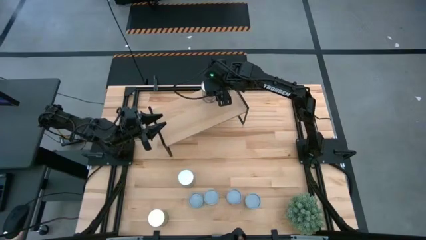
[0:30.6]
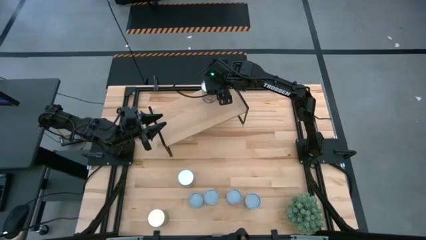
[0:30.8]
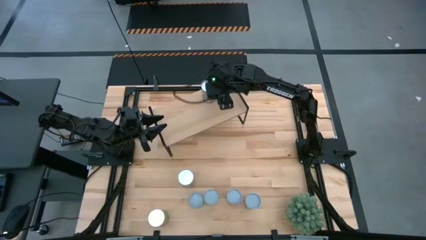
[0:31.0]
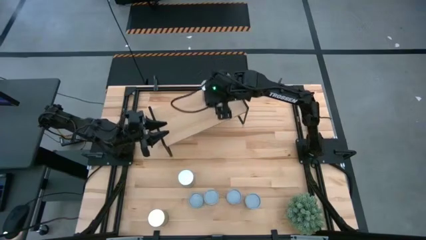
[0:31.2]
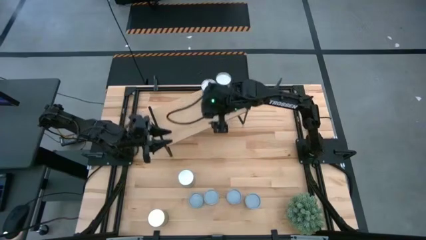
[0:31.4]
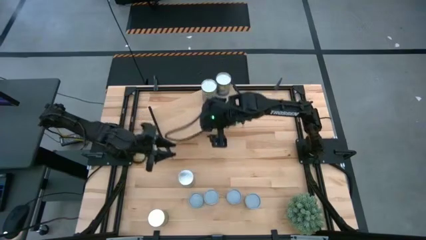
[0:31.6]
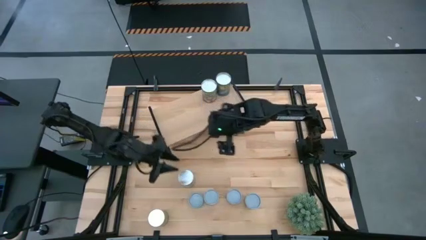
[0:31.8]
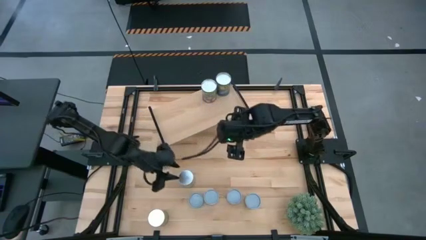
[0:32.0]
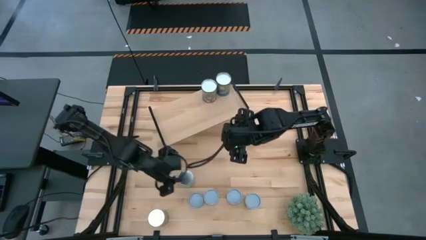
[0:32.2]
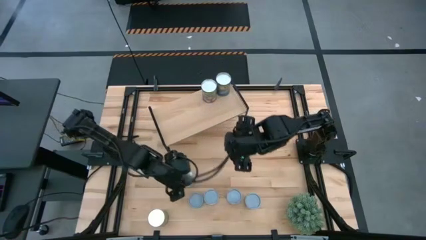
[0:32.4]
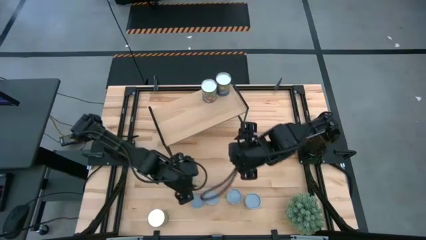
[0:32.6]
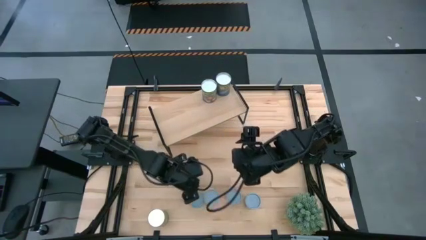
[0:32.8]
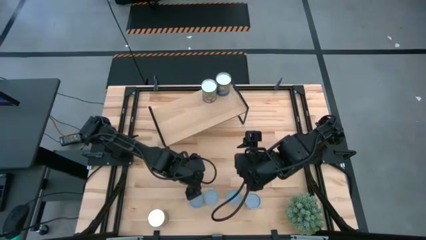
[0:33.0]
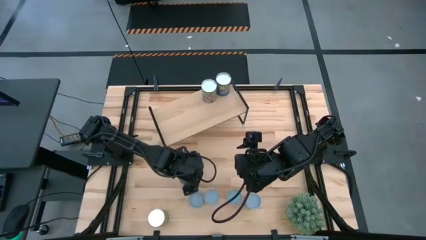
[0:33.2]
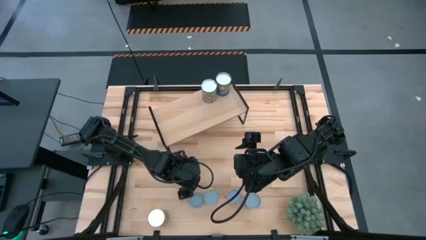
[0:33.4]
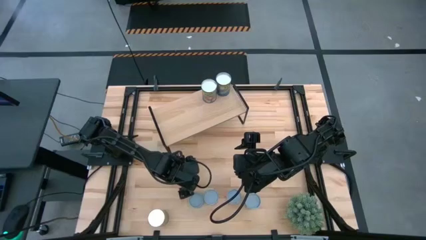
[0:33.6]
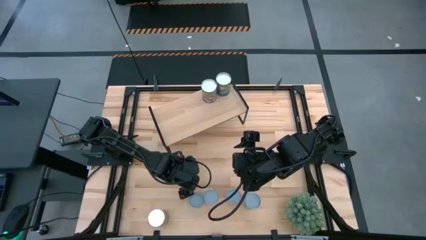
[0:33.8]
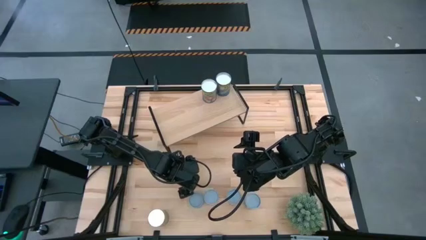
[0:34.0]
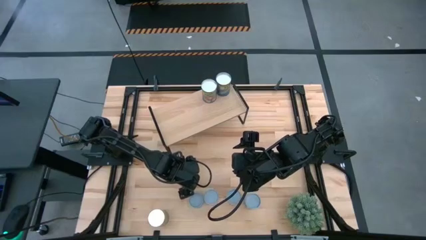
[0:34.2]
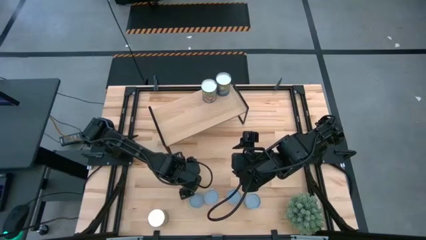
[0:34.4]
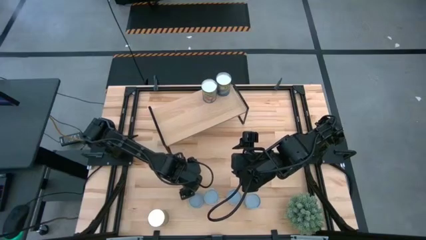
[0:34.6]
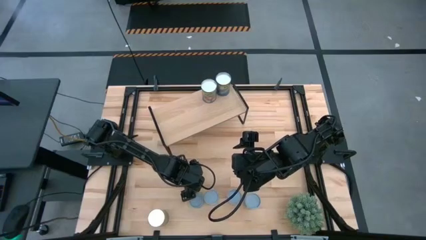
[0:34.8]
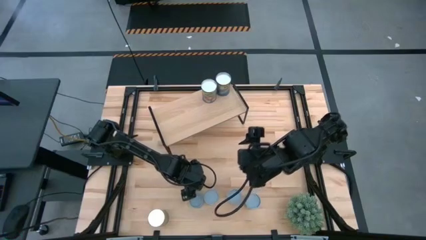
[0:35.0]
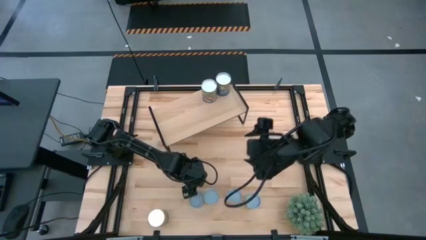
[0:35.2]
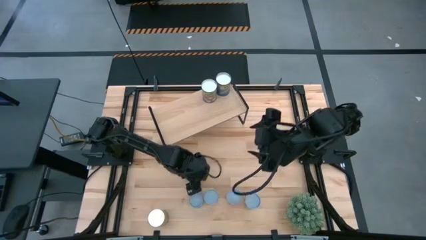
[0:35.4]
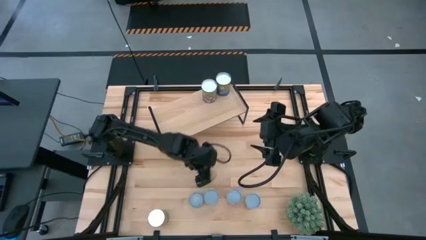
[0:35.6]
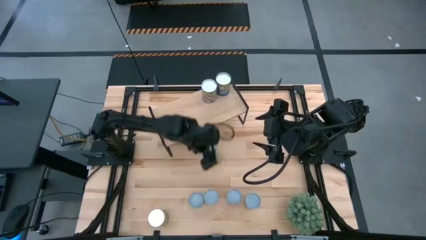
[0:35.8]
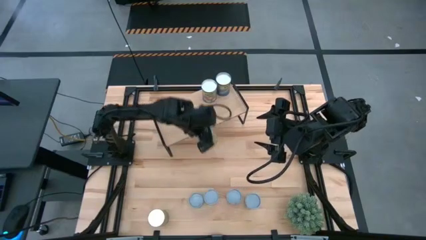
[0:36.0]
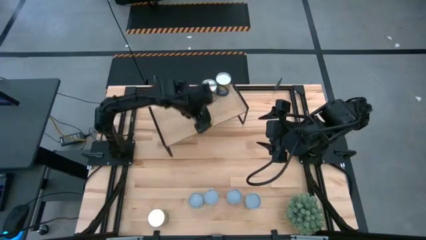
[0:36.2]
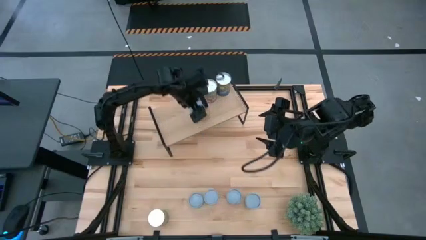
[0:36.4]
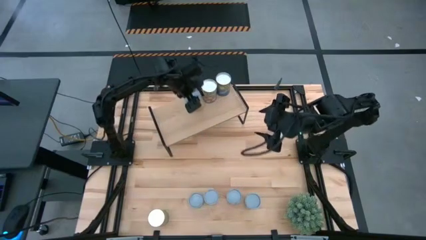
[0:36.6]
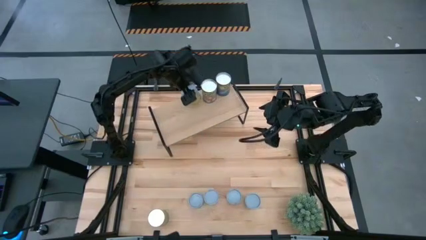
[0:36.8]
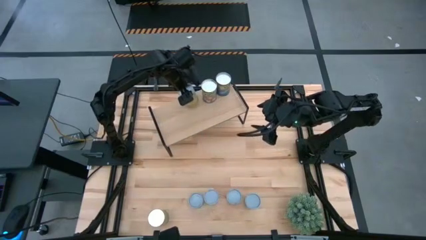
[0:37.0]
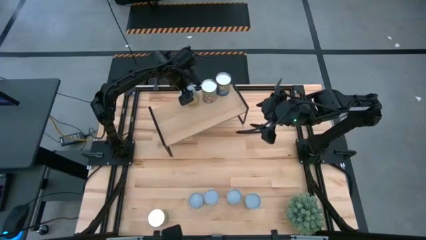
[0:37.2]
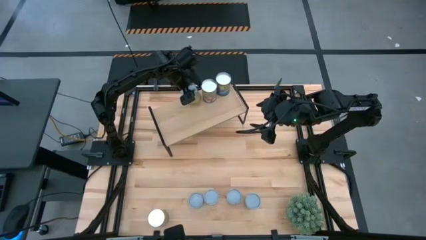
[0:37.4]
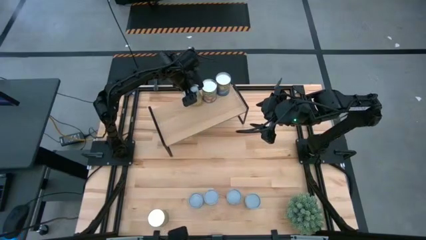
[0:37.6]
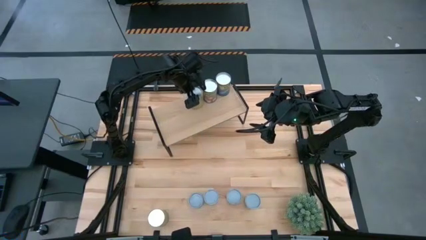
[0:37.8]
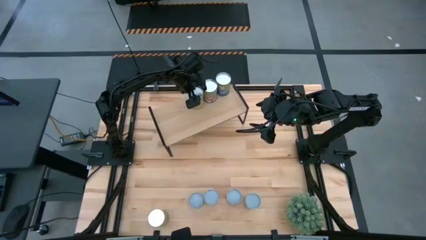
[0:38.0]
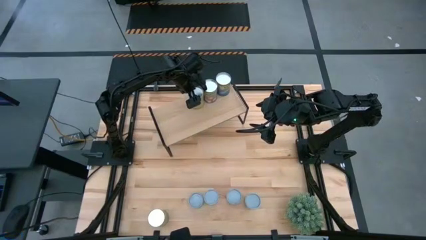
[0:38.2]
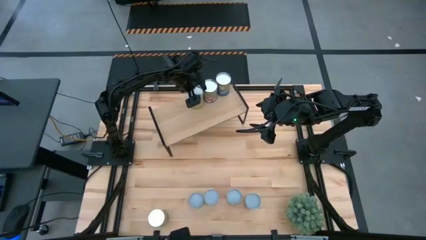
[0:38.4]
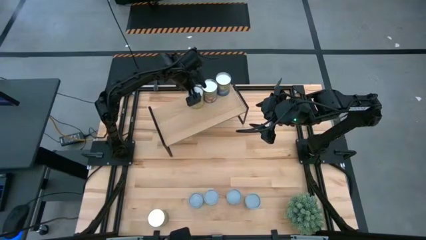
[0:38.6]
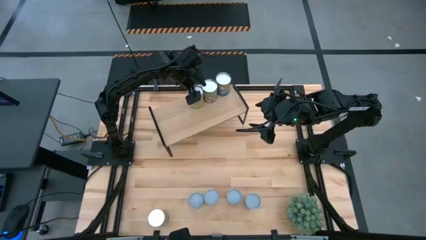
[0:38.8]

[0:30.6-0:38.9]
Task: Pick and place cans onto a shelf
Put the canned carrots on the shelf

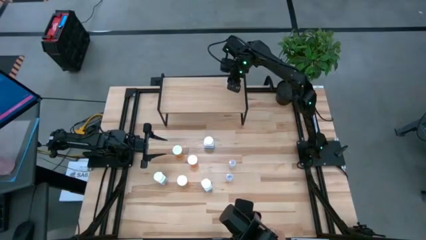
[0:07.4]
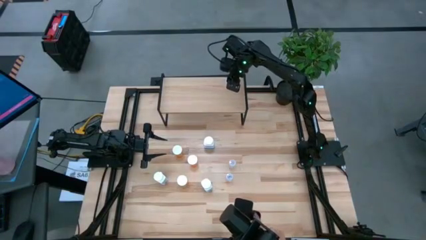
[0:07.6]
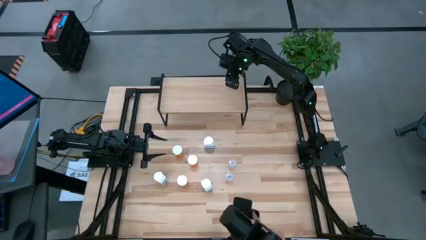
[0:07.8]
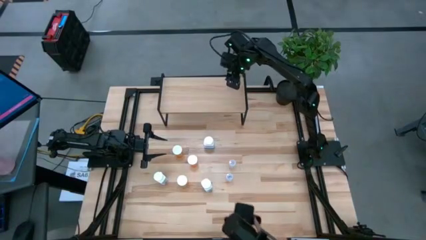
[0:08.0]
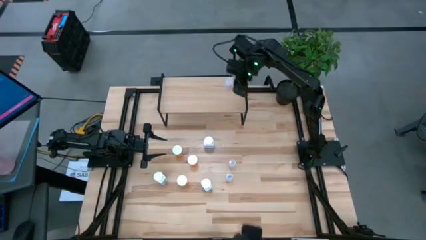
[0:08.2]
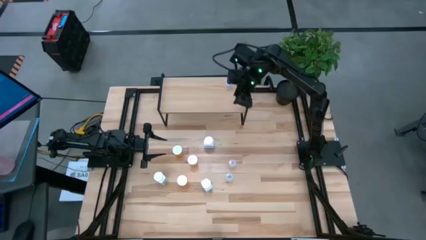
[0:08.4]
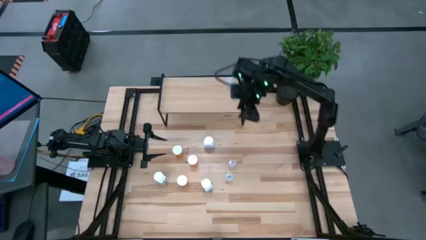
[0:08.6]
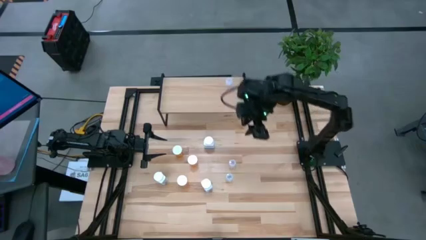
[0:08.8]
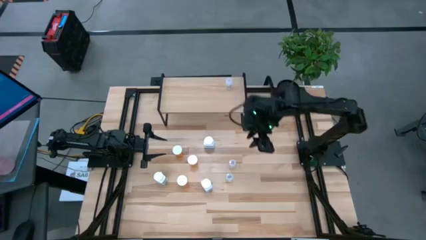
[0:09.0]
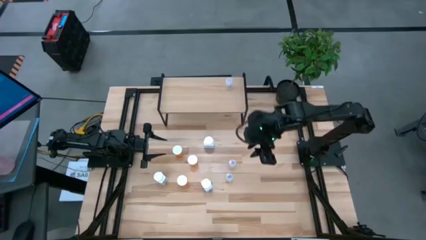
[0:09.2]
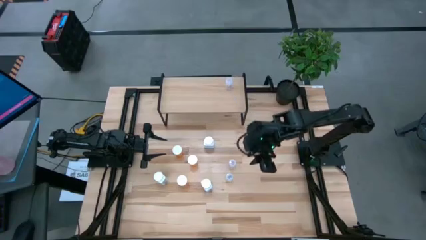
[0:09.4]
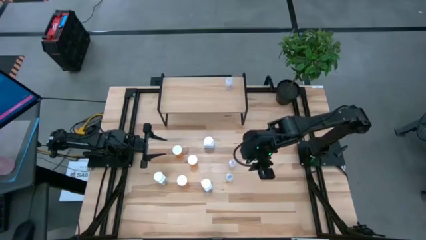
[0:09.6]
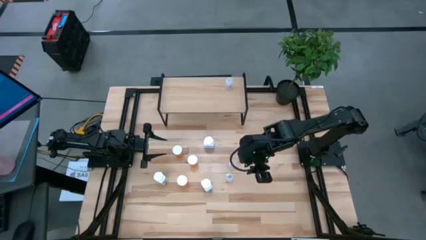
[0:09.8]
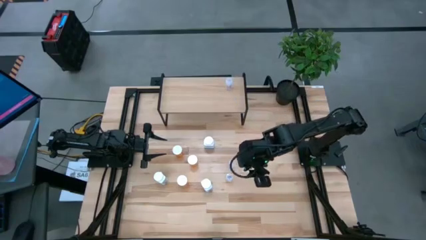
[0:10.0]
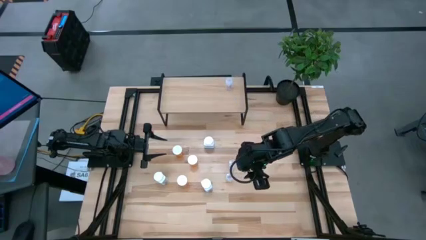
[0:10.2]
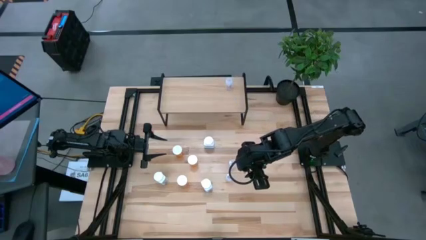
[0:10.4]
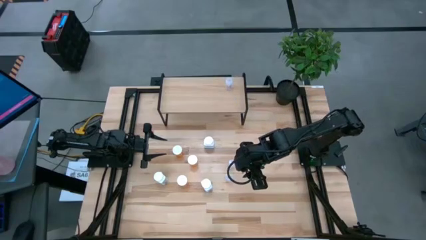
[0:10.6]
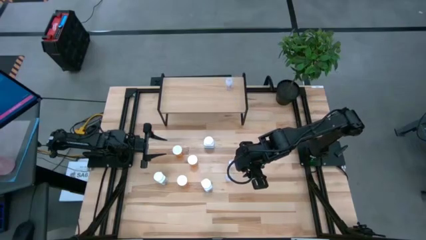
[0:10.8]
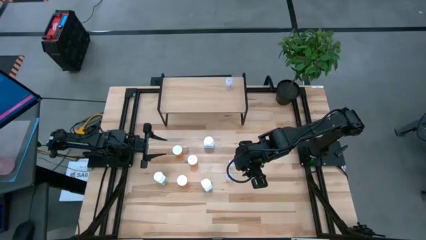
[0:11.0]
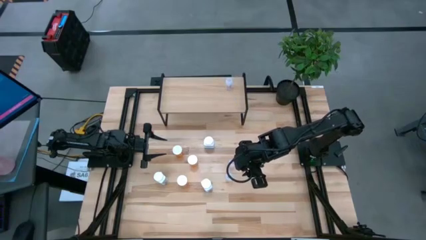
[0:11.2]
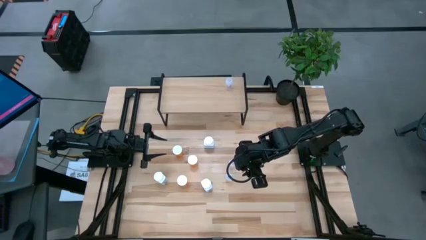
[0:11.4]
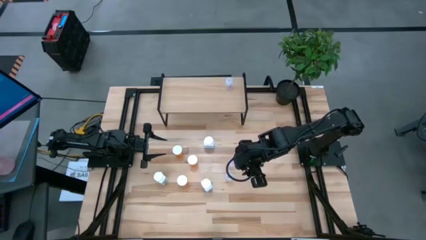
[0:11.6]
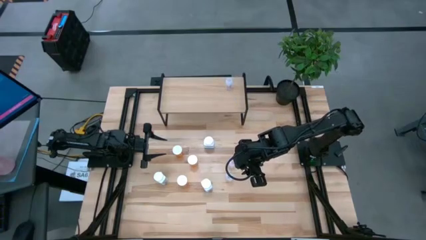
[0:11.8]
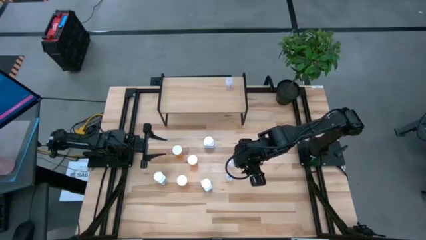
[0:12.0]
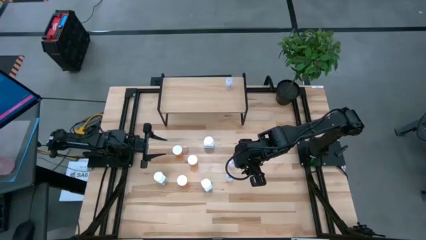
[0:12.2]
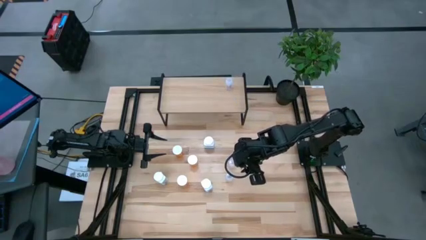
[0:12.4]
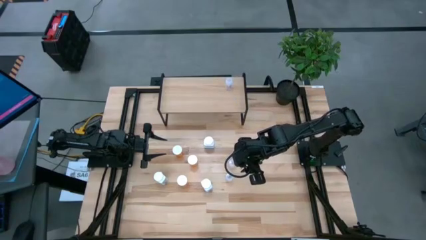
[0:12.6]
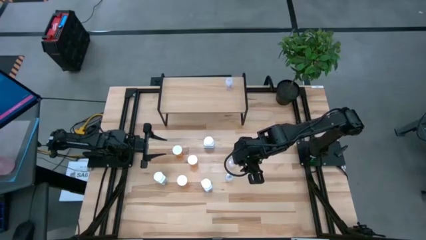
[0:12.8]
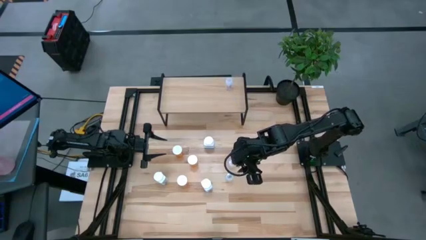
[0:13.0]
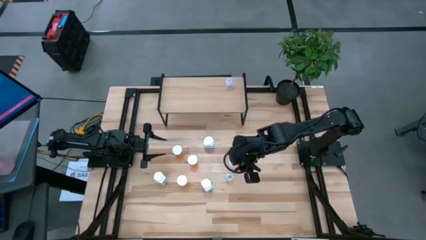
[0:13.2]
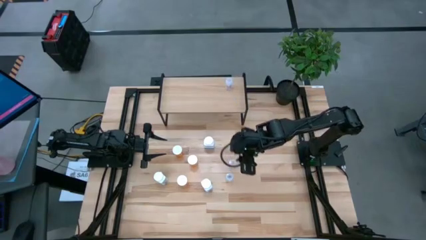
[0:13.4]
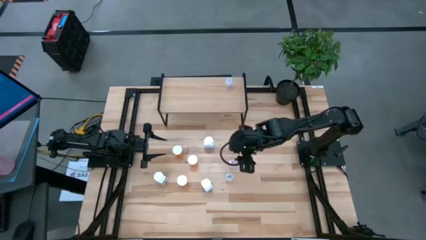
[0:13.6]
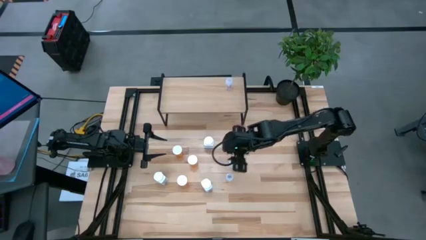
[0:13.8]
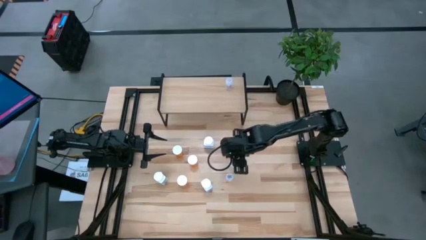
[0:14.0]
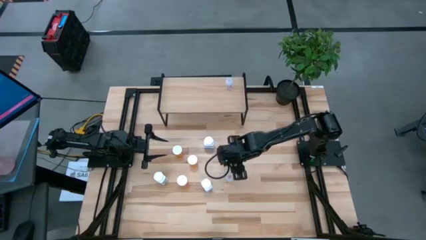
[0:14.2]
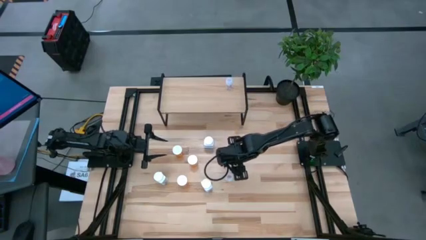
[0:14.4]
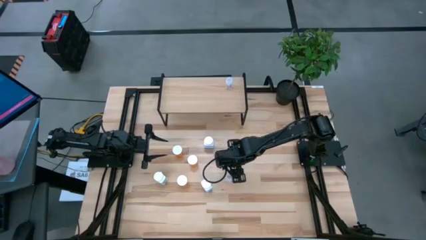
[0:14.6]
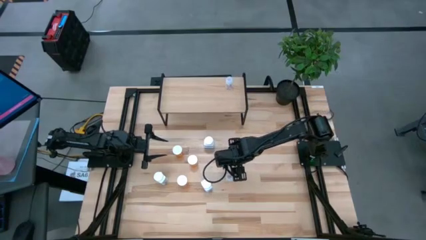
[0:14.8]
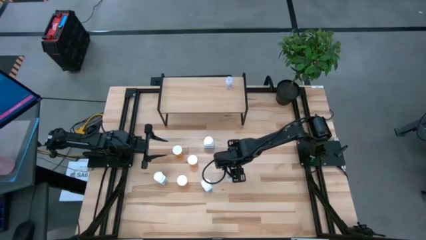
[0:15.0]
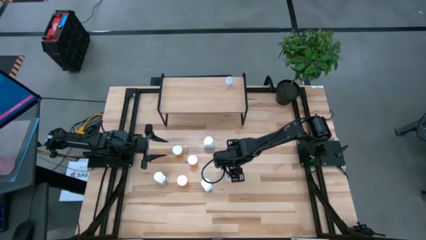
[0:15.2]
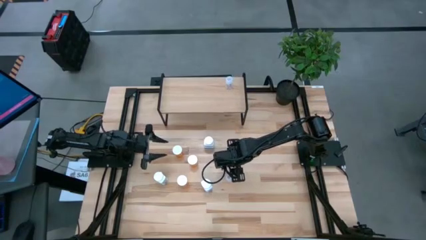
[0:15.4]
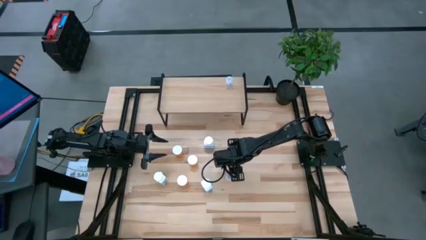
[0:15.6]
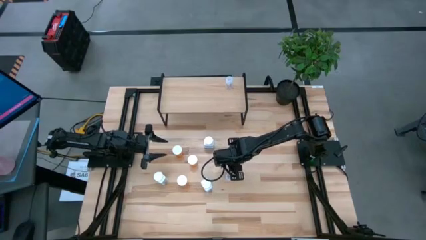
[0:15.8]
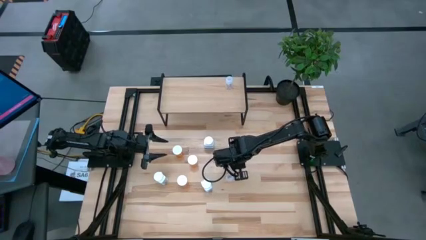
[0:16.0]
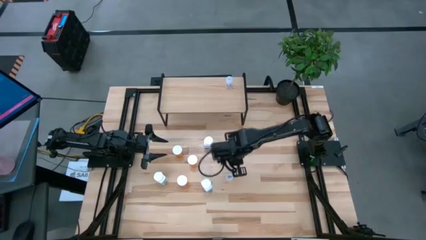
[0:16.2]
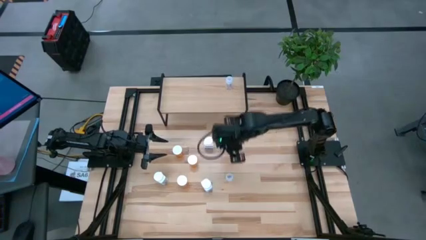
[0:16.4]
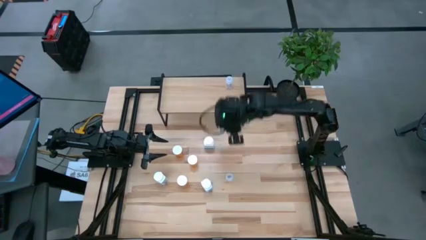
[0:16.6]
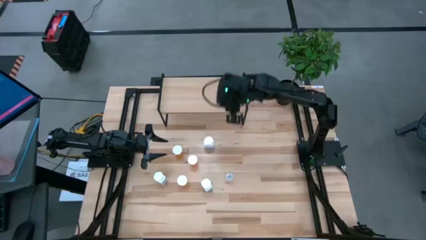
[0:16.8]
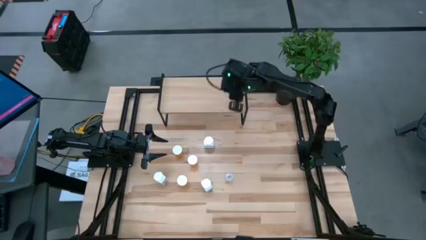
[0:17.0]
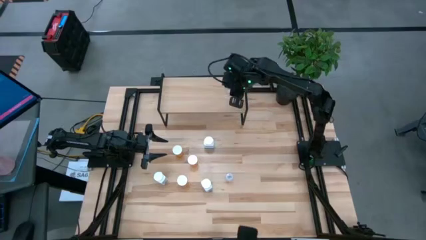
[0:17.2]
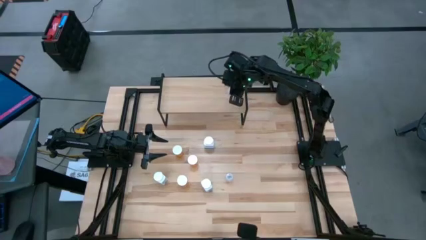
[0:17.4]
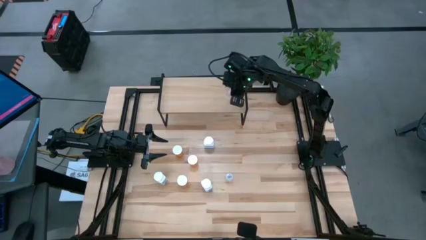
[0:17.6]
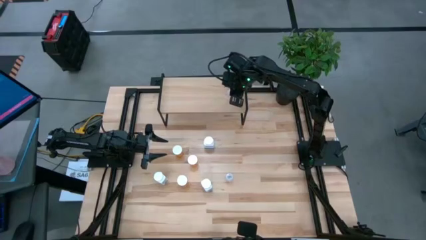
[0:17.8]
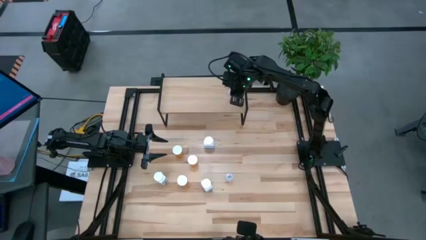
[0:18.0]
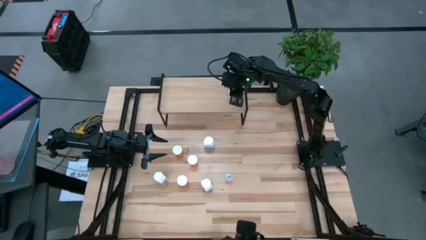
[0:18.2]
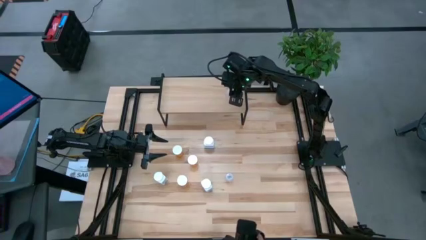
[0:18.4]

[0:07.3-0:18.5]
Task: Pick and place medicine bottles onto shelf by color
Put the top transparent pill bottle on the shelf aligned with the other transparent pill bottle
